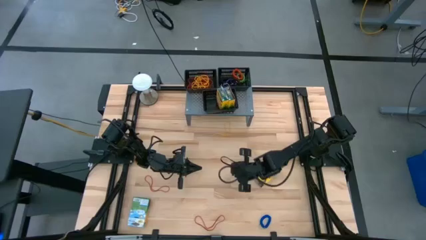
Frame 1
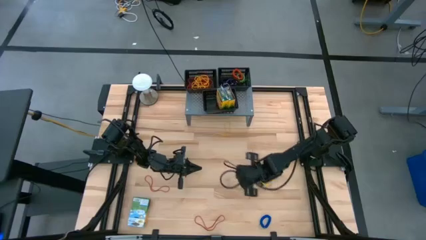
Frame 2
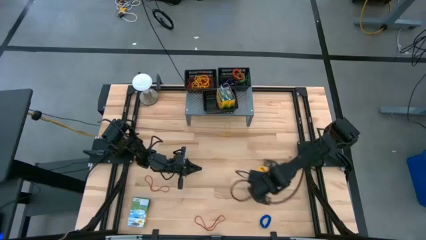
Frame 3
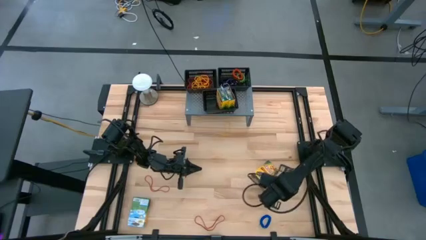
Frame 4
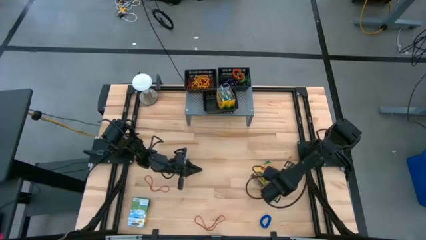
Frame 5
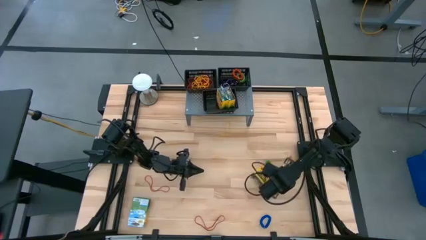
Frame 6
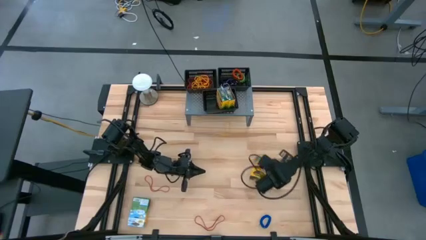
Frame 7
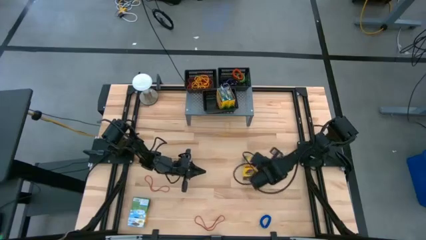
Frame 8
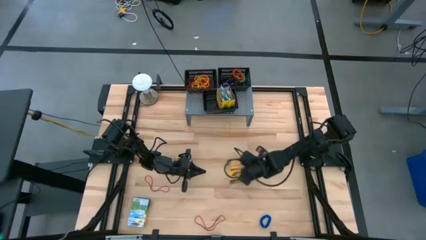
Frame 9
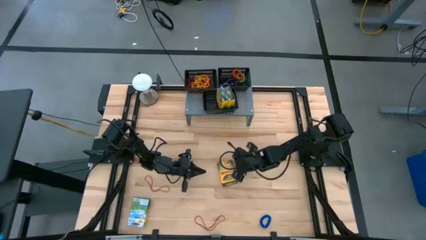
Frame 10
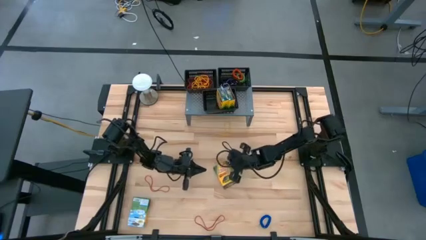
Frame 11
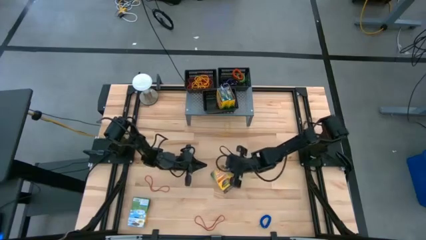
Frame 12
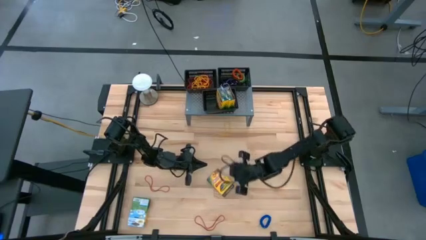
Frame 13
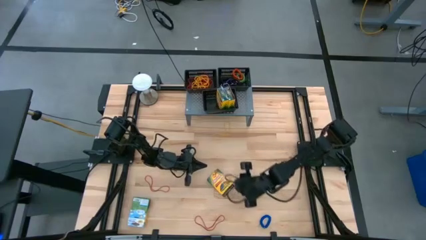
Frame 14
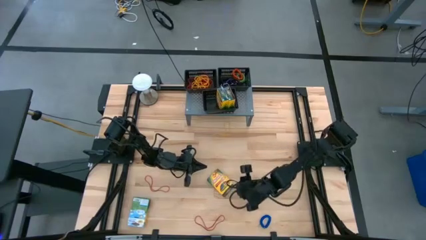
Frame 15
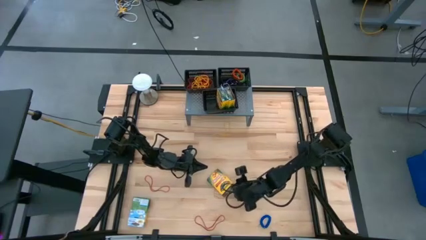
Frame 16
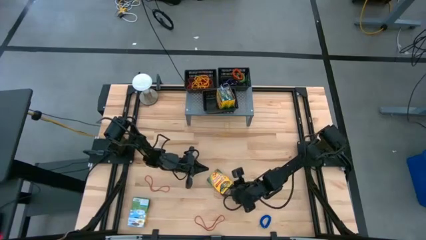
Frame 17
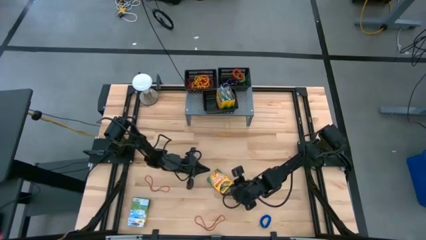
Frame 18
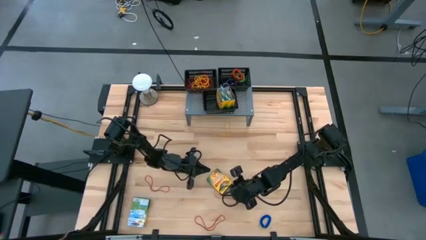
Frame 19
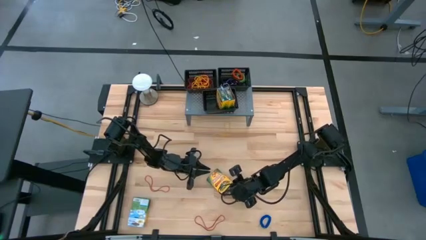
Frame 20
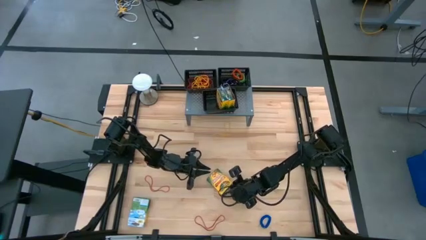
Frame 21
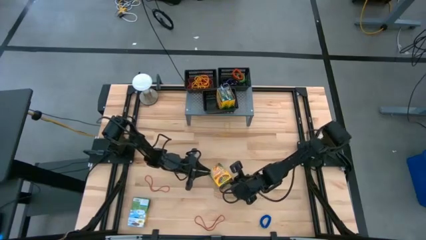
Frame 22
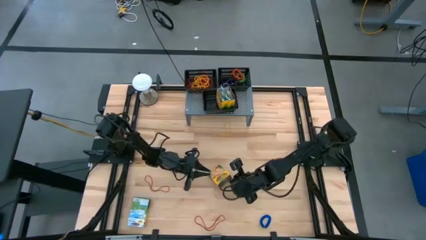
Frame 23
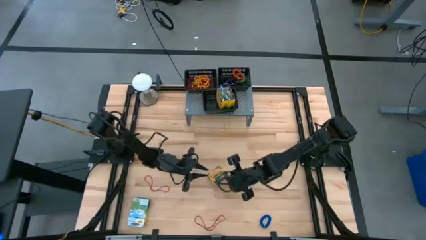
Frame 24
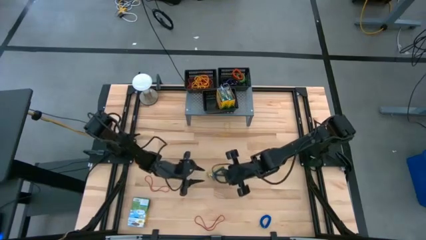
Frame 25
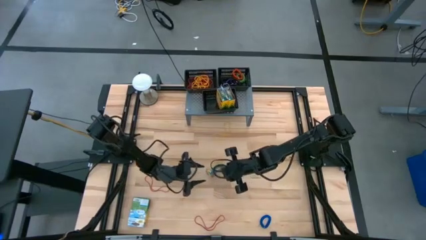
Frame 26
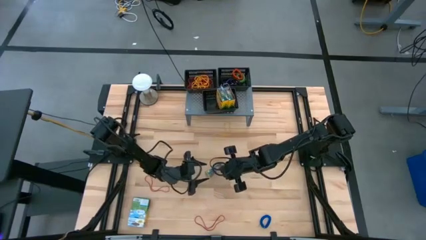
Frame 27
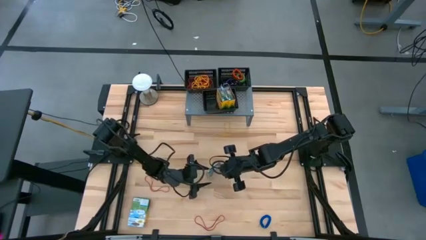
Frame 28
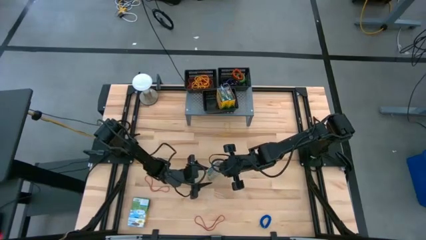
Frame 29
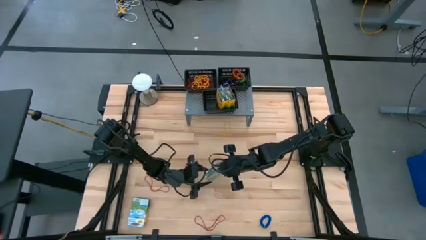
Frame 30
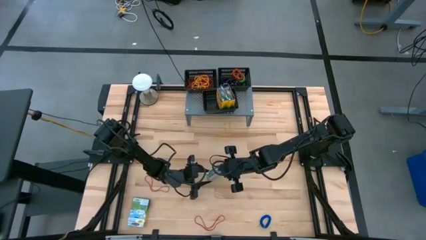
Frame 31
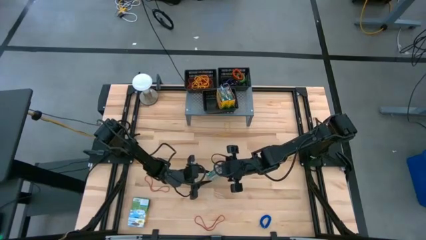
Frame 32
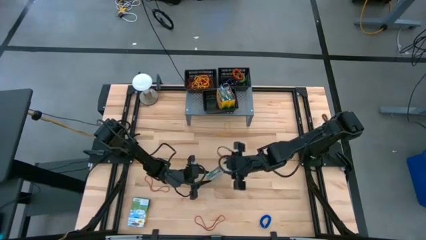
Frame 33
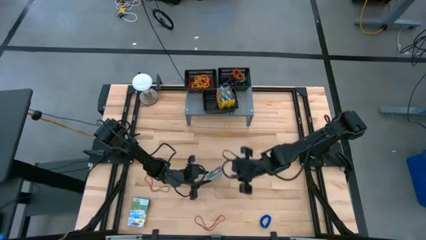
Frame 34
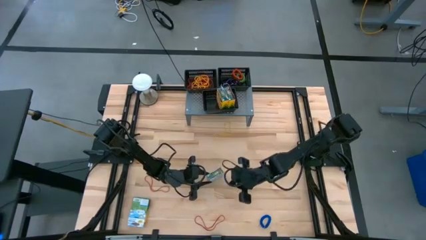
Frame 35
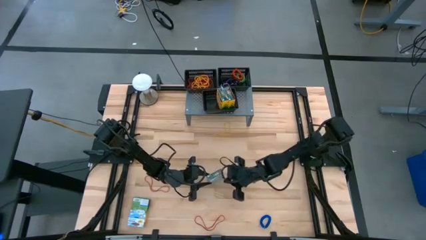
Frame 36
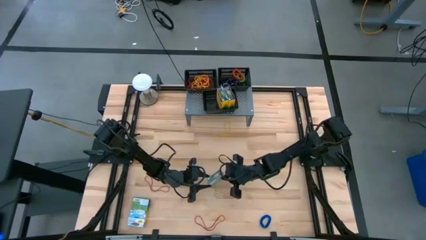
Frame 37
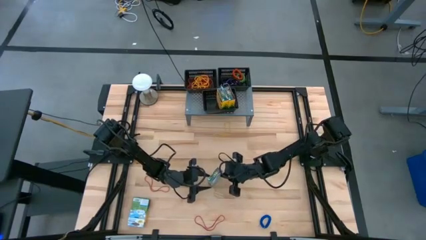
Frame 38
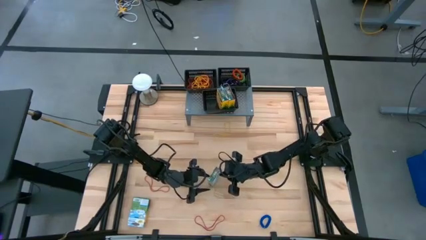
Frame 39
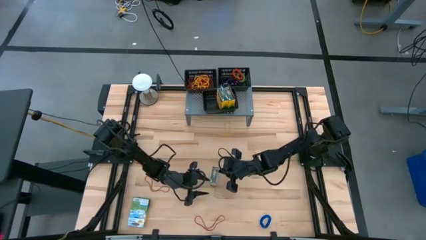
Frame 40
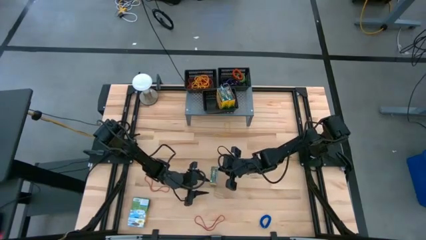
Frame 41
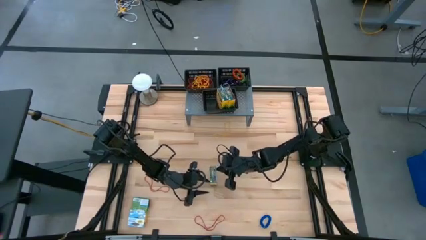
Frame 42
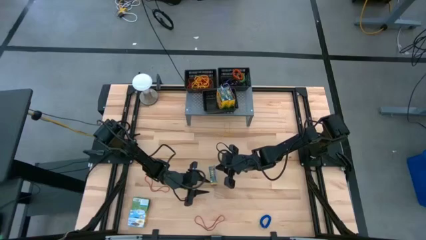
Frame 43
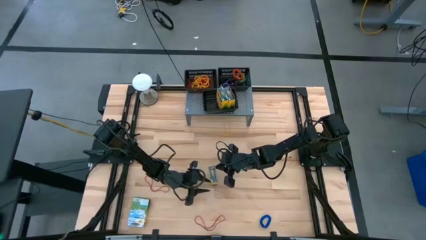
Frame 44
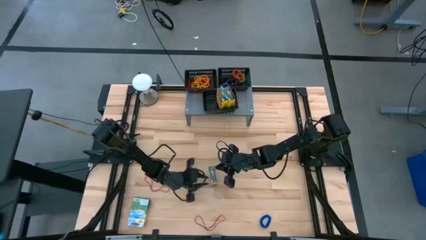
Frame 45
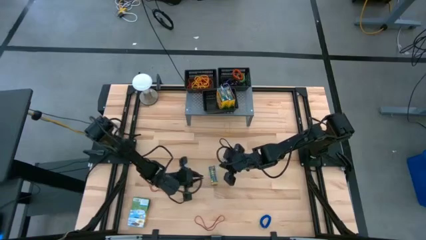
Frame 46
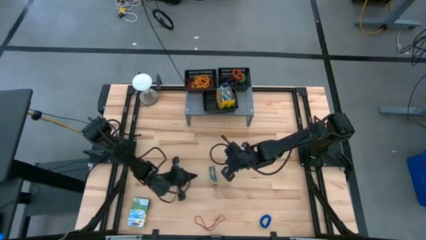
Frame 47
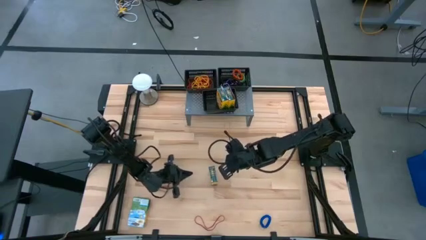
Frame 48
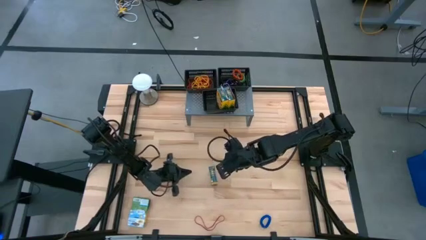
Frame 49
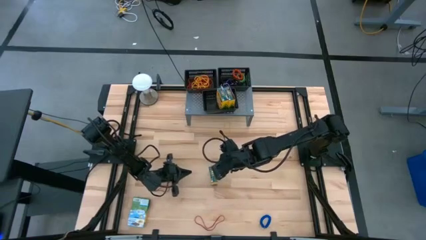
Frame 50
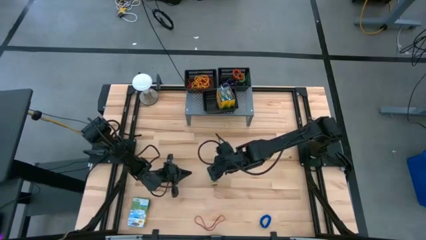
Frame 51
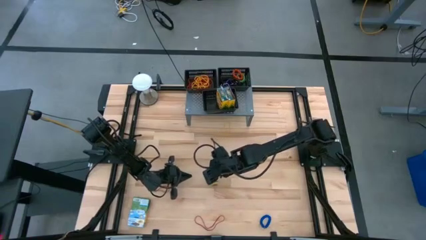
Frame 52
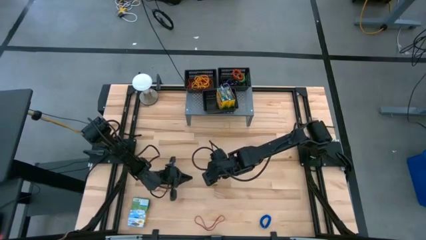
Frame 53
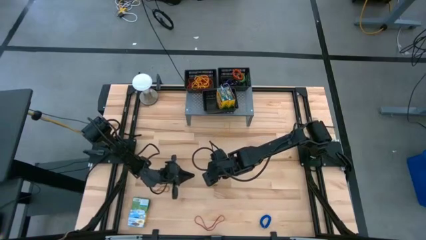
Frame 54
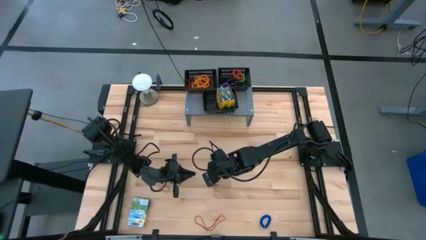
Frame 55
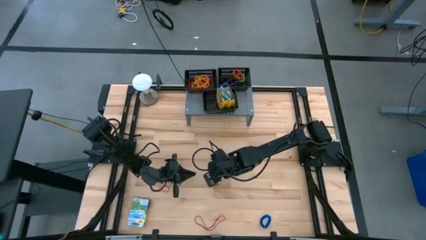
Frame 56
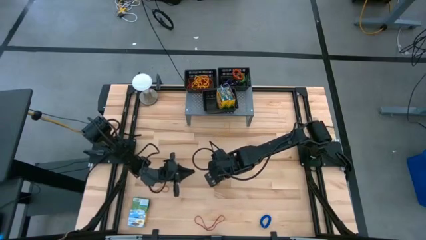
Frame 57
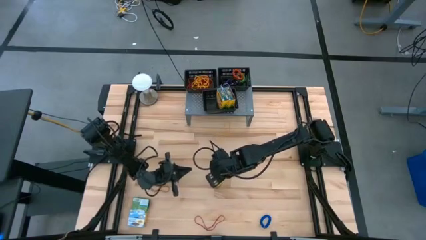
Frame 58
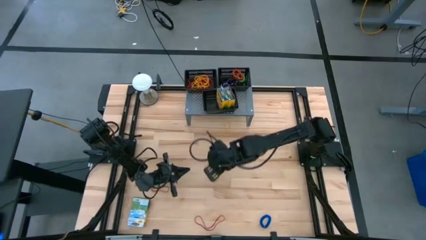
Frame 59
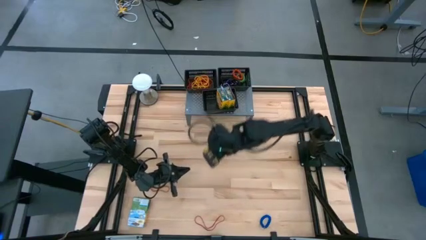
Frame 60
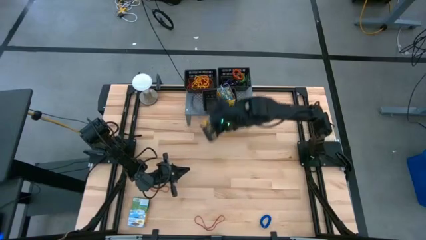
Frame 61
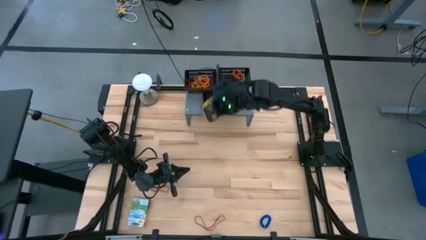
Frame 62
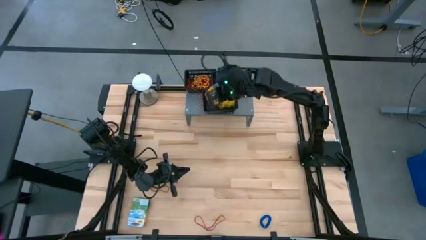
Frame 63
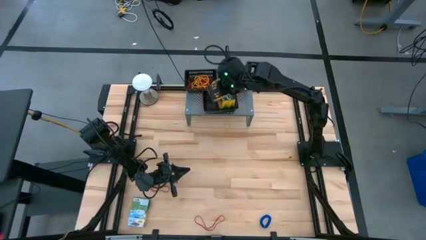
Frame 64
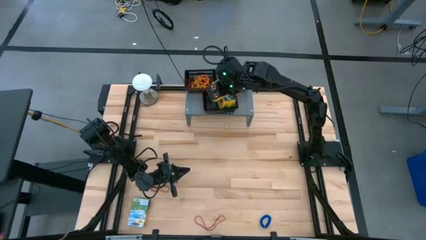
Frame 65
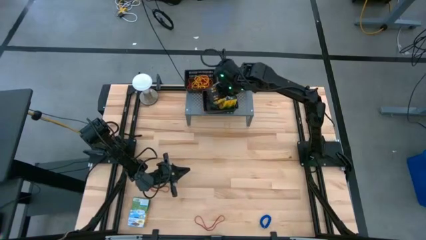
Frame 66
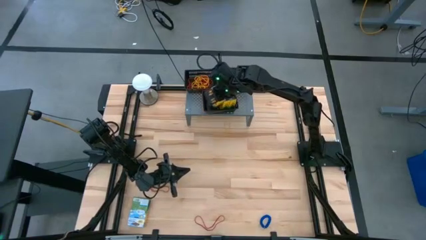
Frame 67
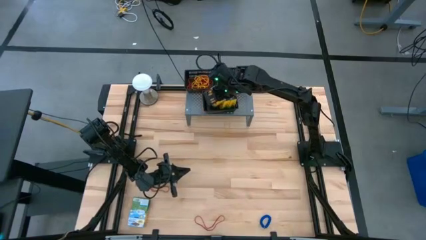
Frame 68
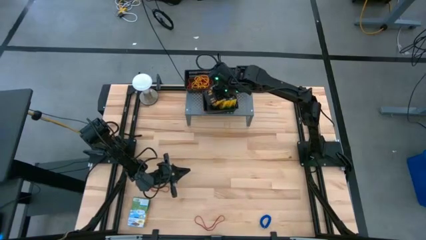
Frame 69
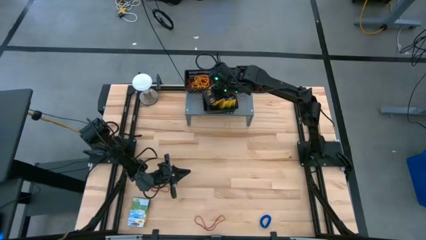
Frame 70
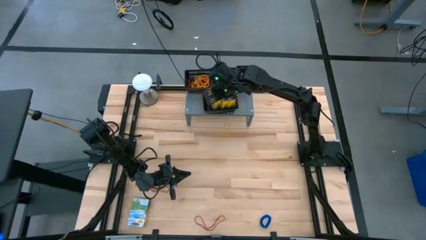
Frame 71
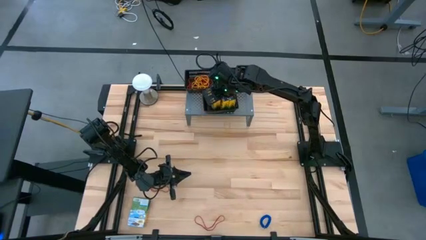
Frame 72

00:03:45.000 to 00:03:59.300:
Task: Pick & Place Office Desk Supplies
Put the crayon box into the bottom black basket on the shelf

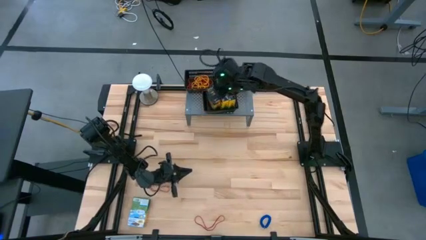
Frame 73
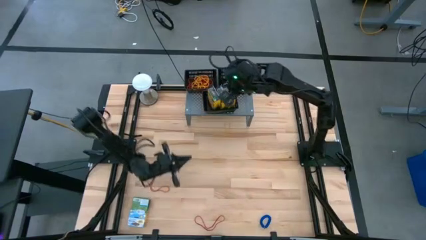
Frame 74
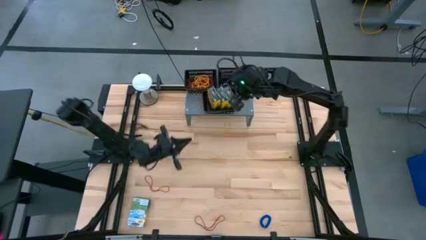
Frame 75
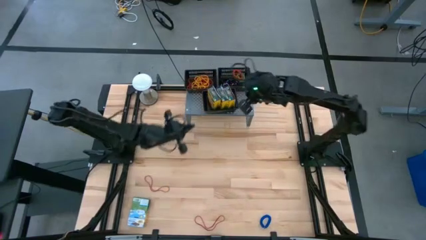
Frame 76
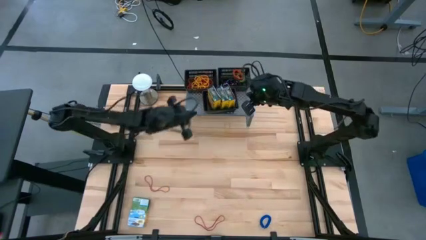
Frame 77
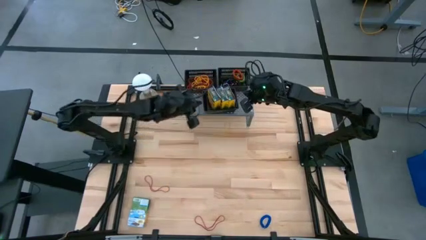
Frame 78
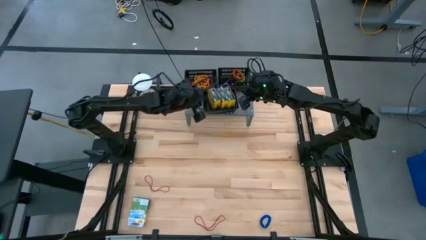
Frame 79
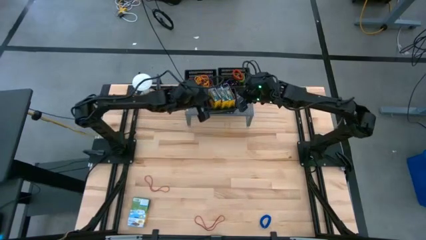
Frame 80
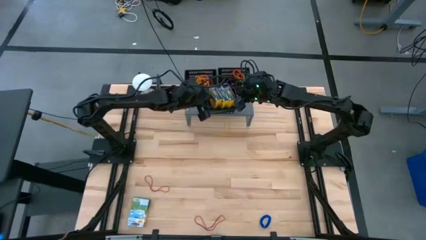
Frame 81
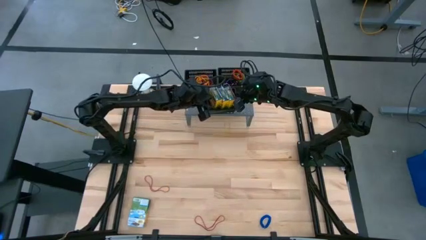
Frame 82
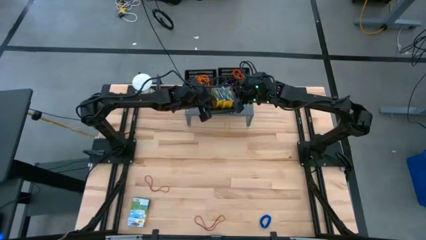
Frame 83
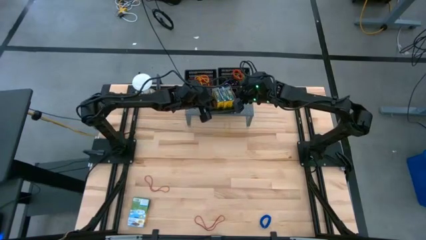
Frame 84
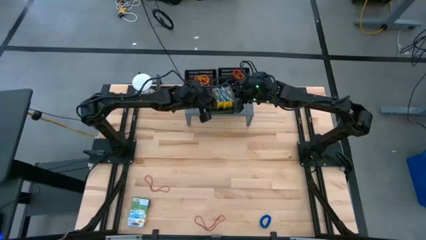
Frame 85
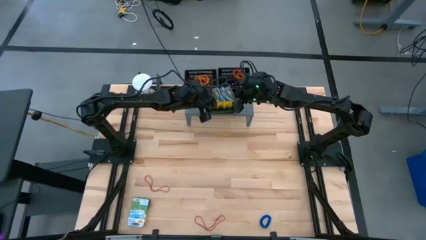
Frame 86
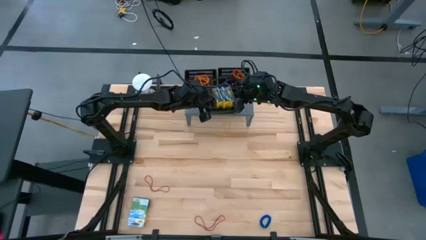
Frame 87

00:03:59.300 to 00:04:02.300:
Adjust the crayon boxes in the bottom basket on the shelf
